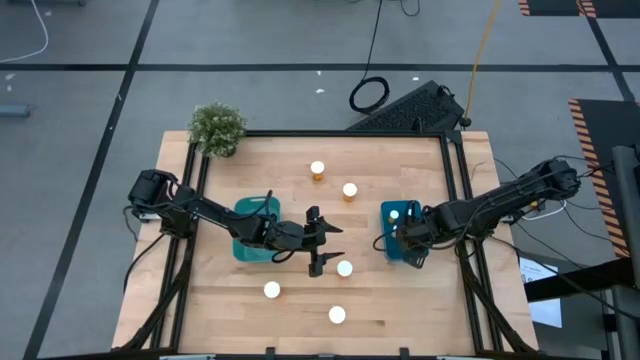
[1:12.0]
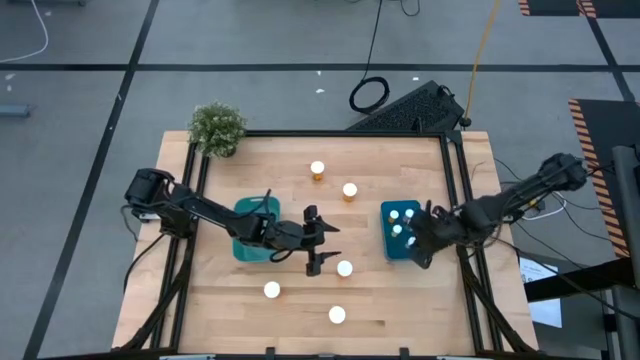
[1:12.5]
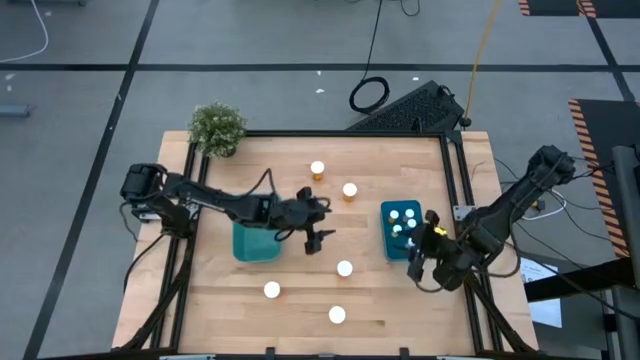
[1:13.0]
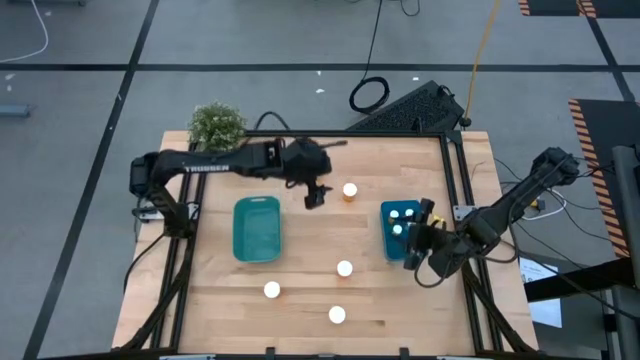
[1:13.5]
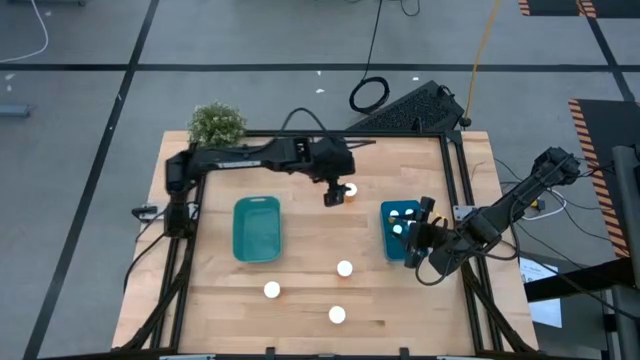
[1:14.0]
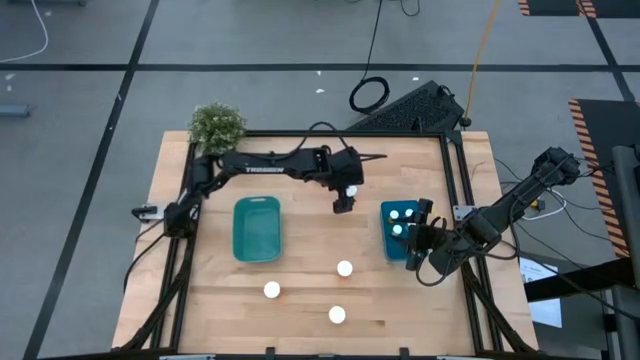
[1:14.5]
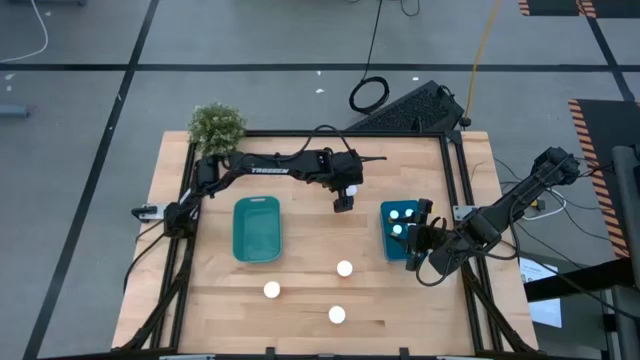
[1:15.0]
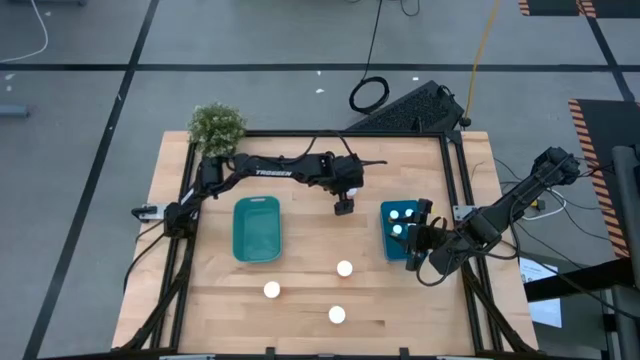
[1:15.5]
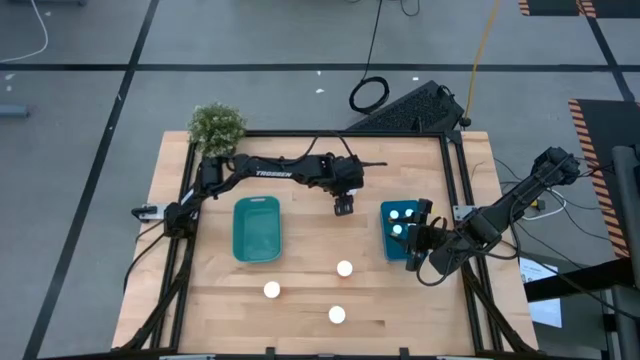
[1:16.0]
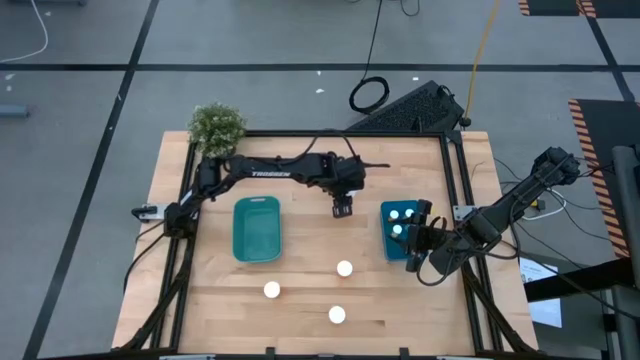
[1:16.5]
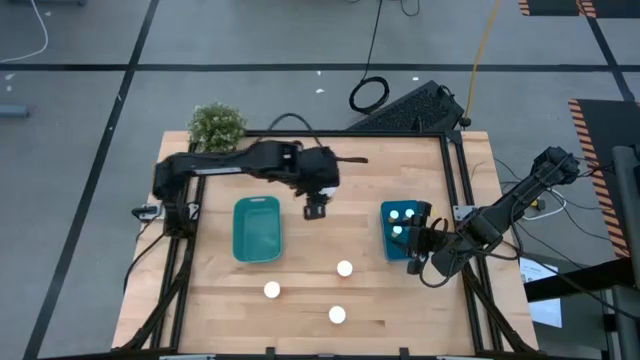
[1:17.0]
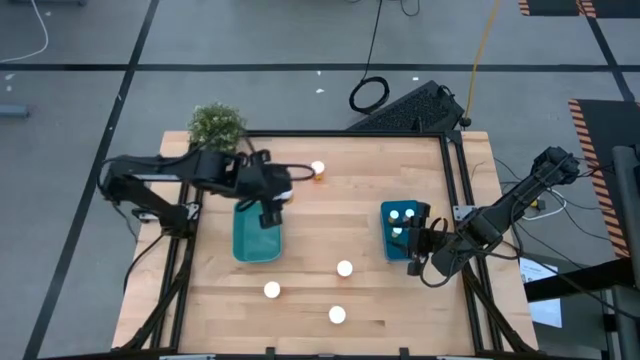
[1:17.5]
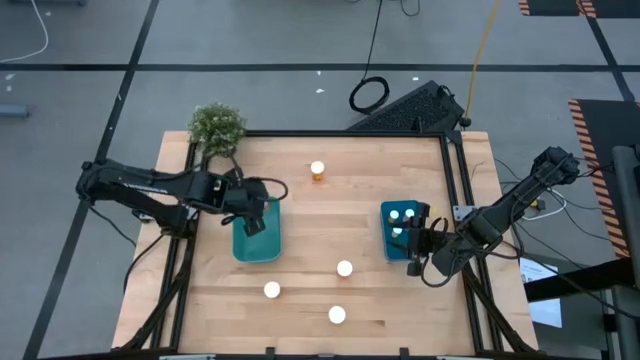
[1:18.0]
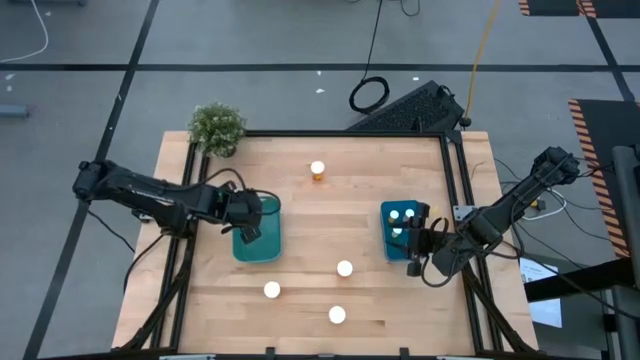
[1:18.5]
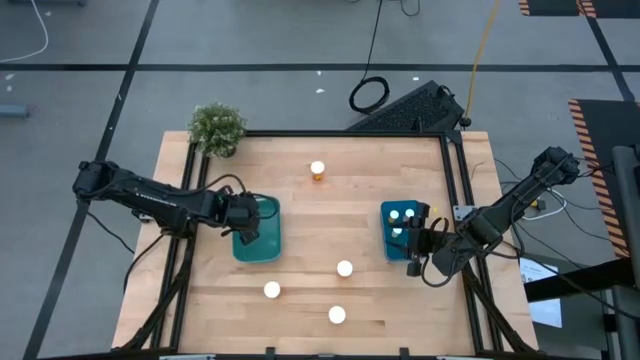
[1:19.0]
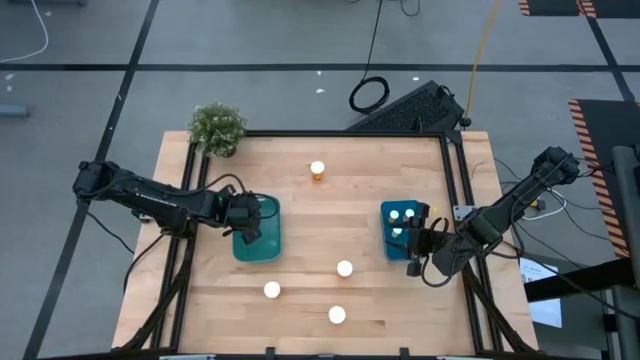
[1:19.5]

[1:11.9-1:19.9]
Task: Pick and place medicine bottles into bin by pill shape (circle, oval)
Put the big orange capsule bottle into the green bin

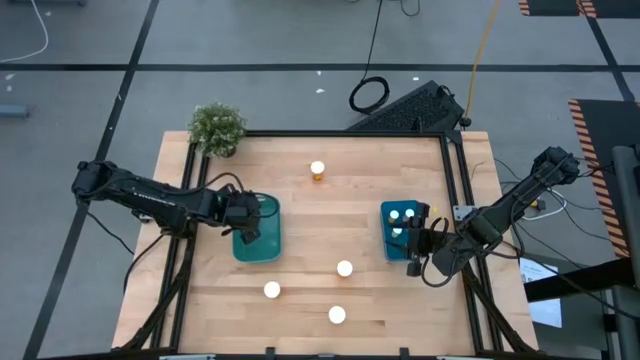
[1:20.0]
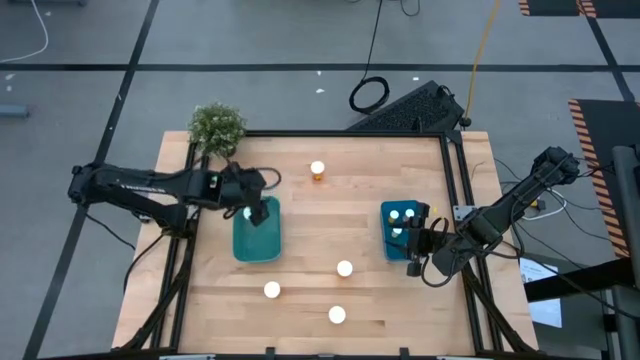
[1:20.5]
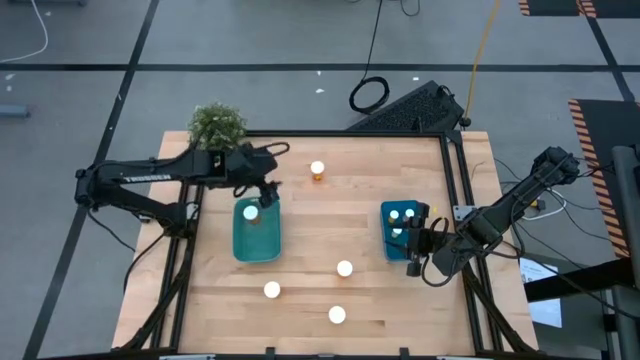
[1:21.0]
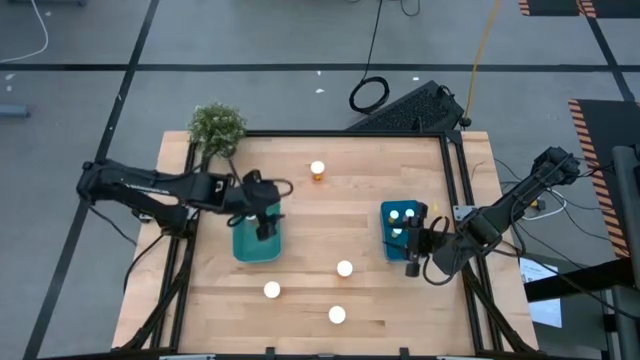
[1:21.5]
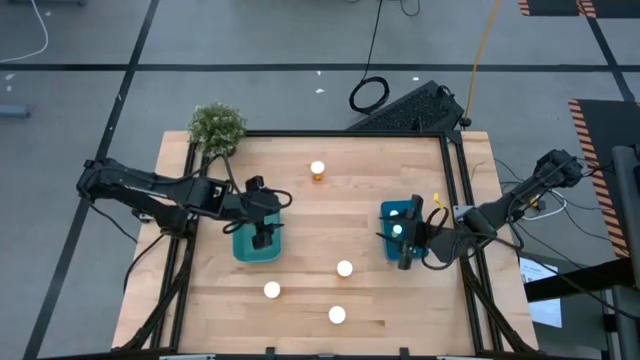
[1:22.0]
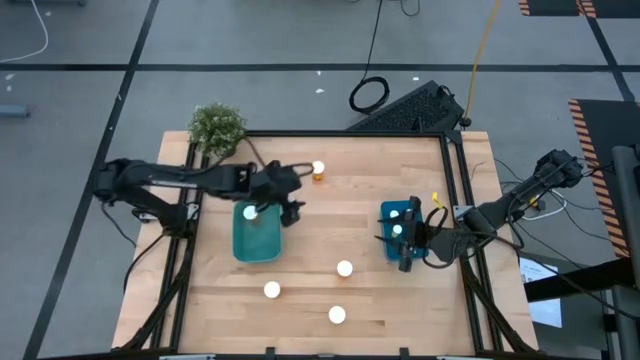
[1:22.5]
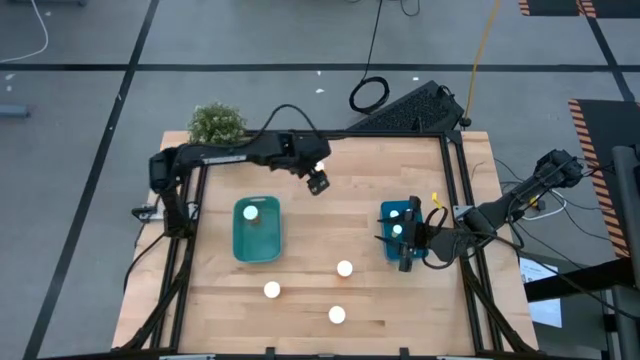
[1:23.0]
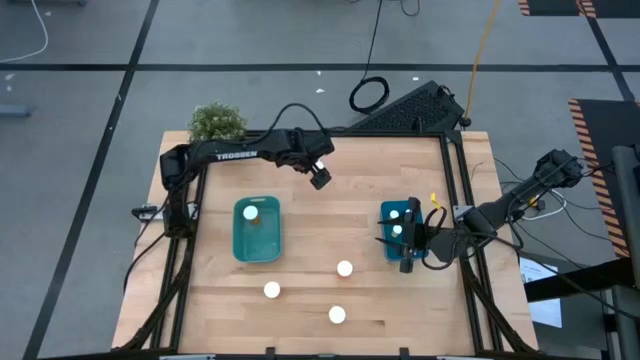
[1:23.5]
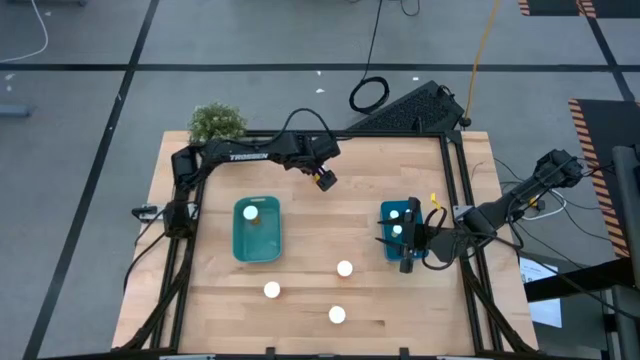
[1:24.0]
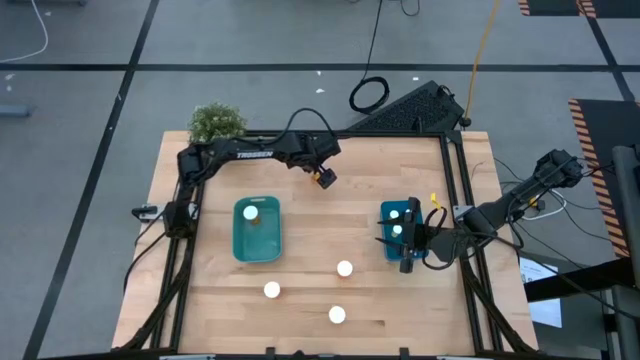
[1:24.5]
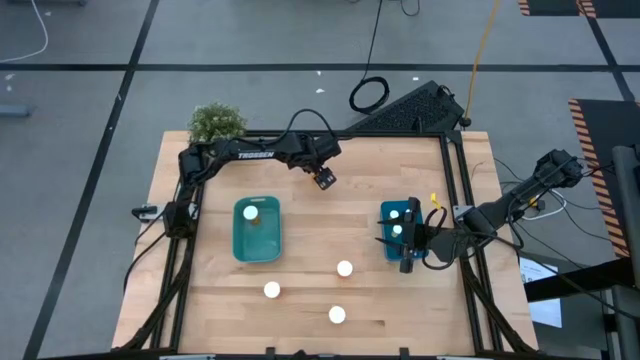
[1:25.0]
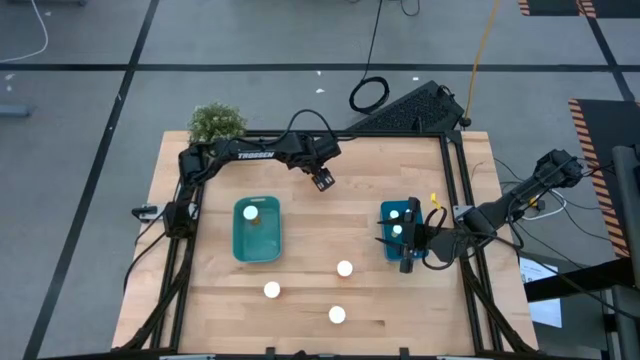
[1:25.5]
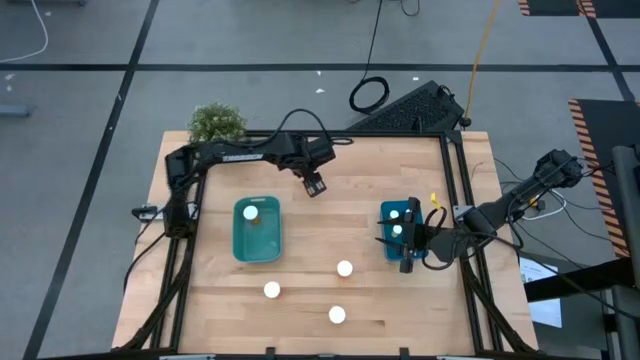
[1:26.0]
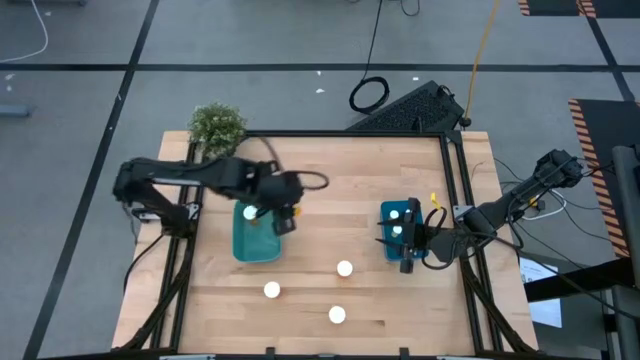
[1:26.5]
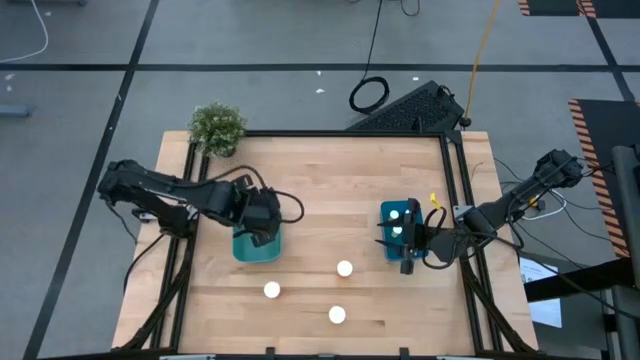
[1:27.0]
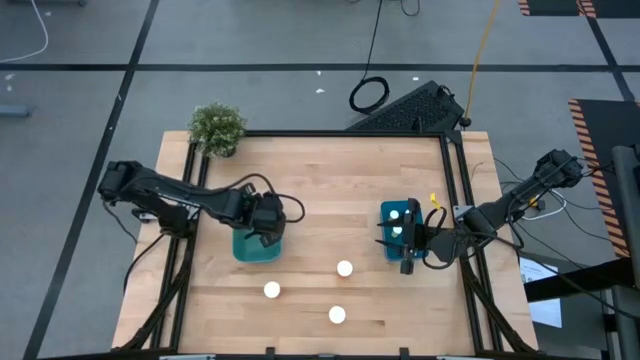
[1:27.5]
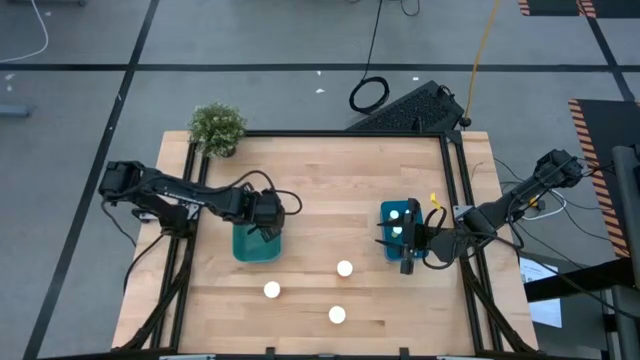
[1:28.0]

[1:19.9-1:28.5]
Put the big orange capsule bottle into the green bin

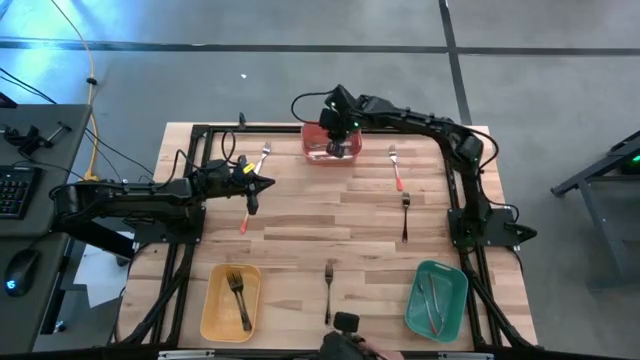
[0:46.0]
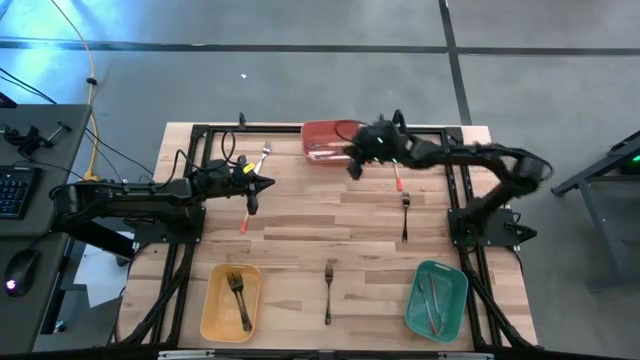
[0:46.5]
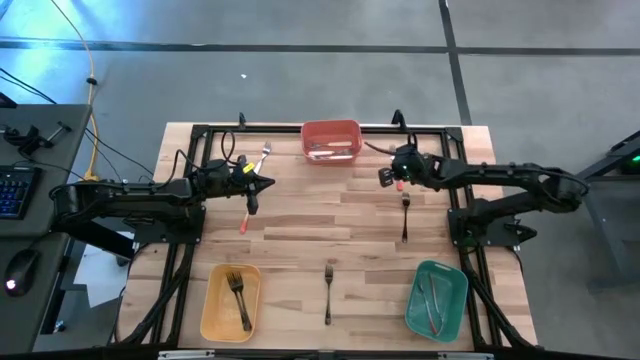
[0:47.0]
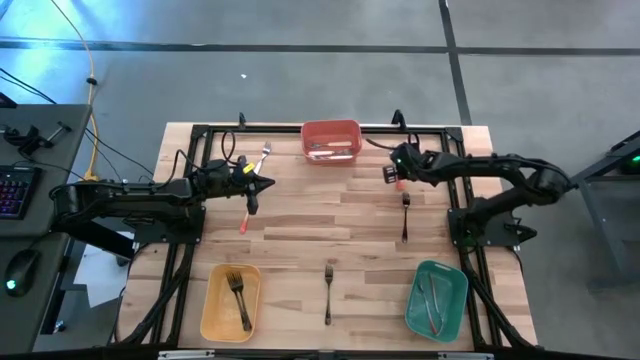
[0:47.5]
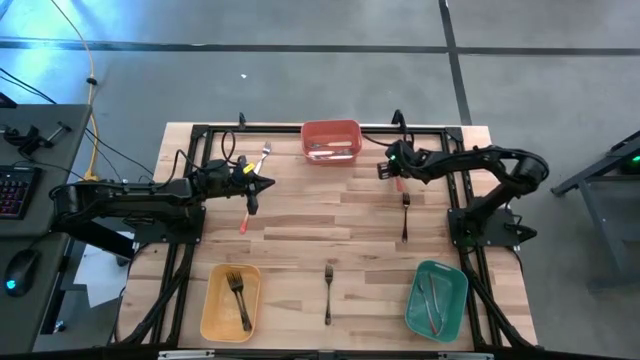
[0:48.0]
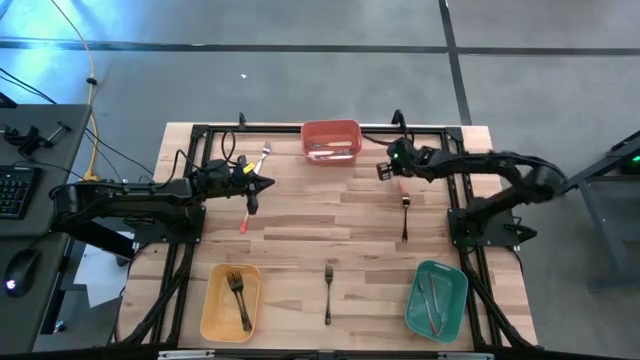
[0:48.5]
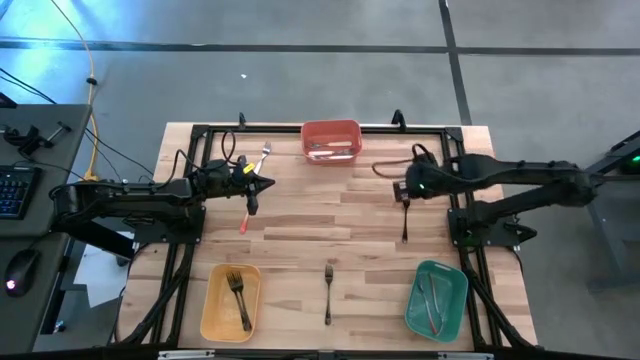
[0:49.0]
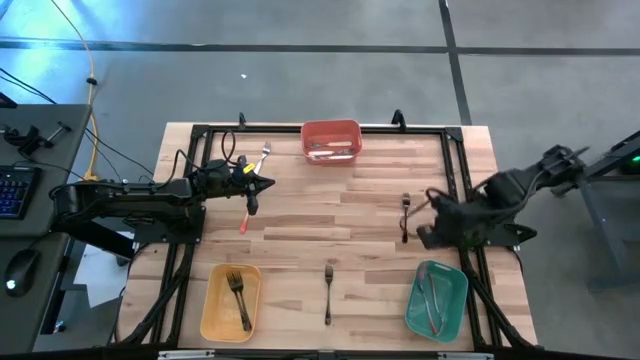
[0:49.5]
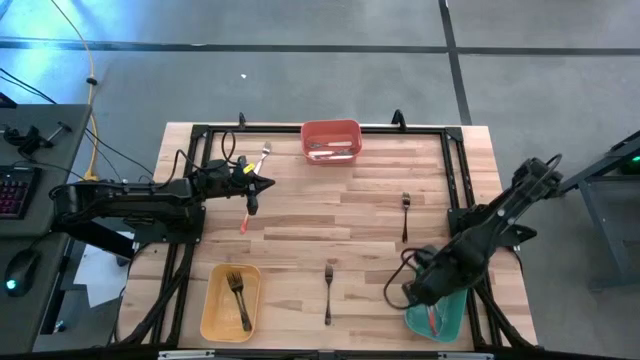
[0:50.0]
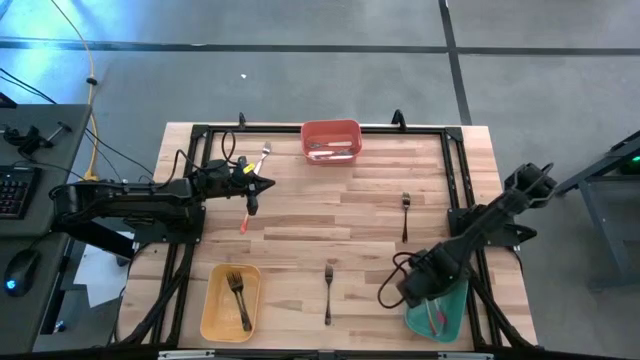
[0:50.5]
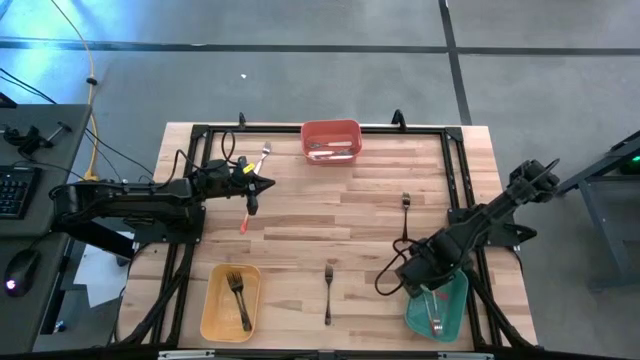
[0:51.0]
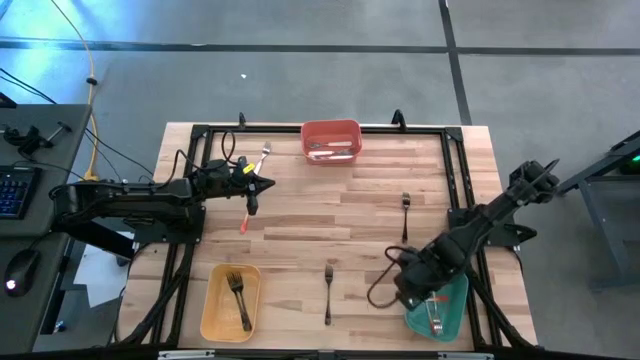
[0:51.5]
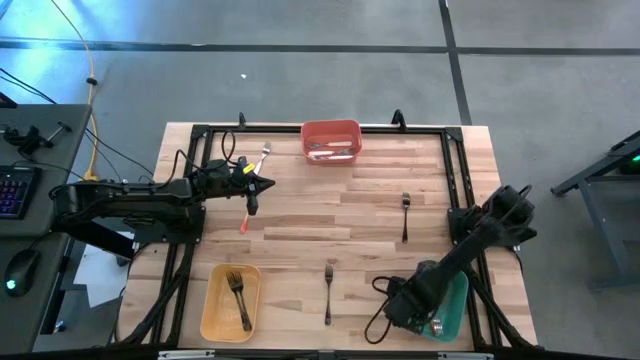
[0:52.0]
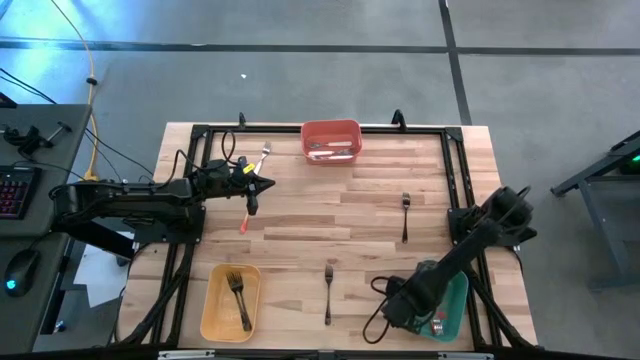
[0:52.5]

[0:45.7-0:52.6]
Task: Sort silverware by color (type)
Put the top orange fork into the green bin
